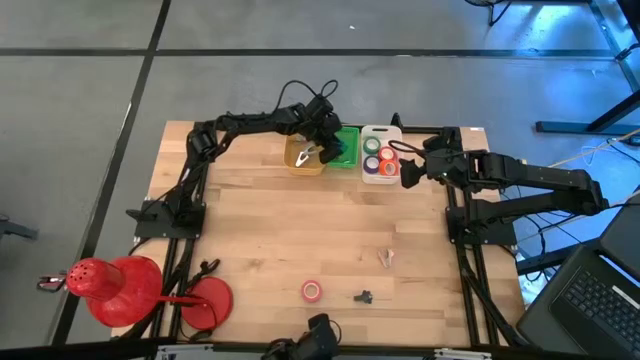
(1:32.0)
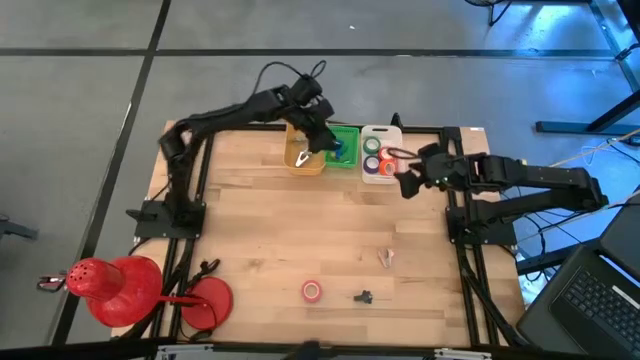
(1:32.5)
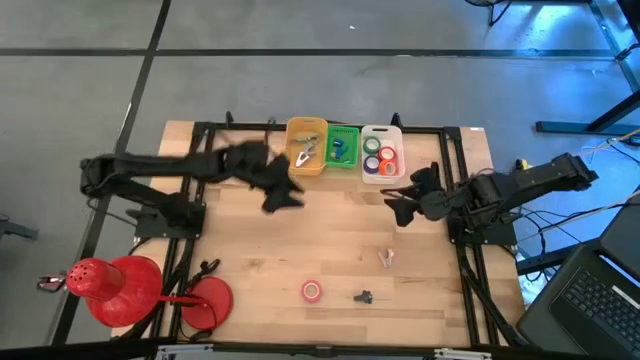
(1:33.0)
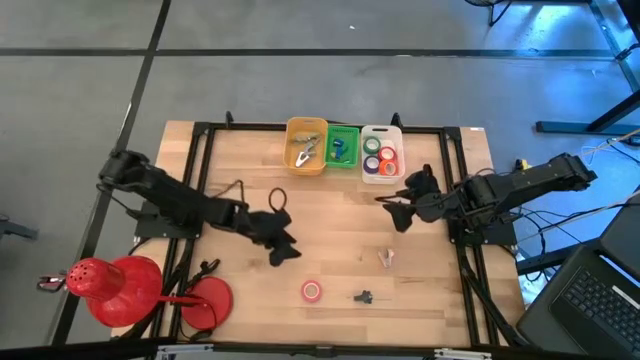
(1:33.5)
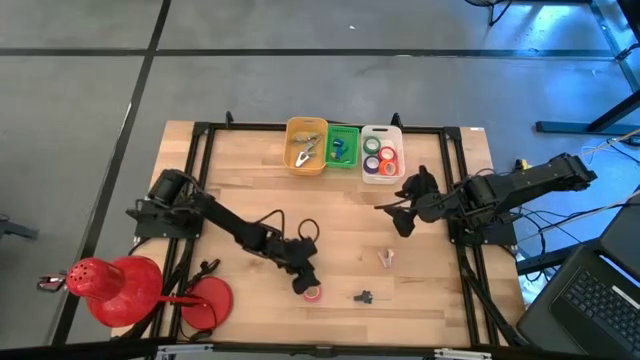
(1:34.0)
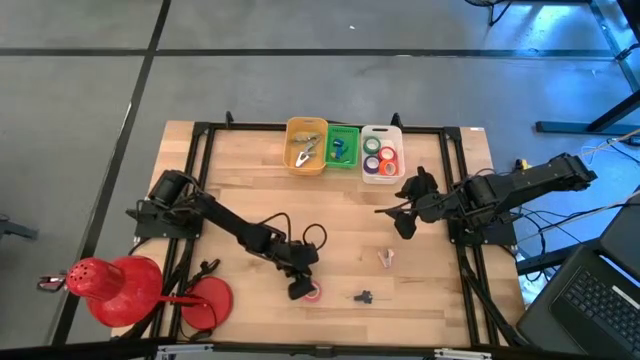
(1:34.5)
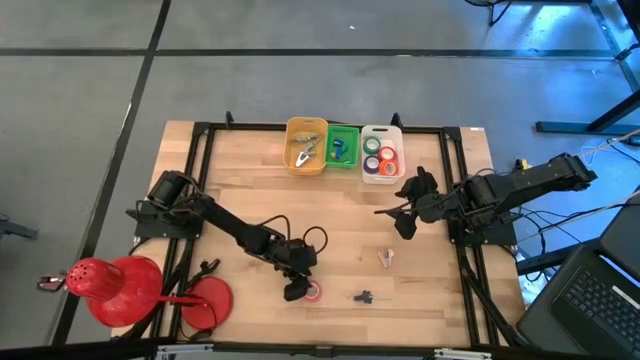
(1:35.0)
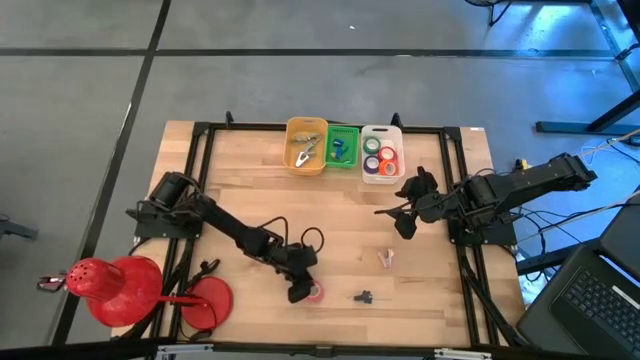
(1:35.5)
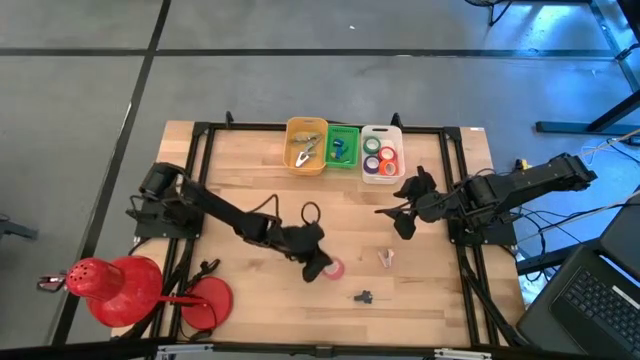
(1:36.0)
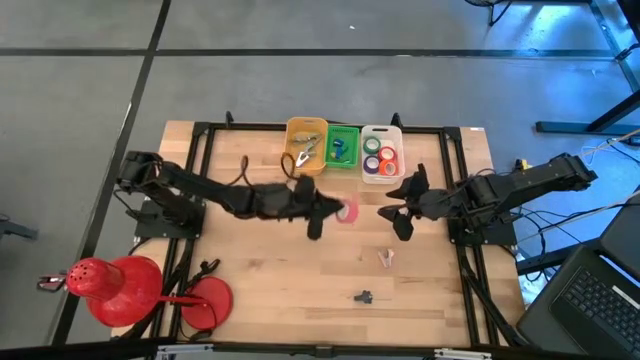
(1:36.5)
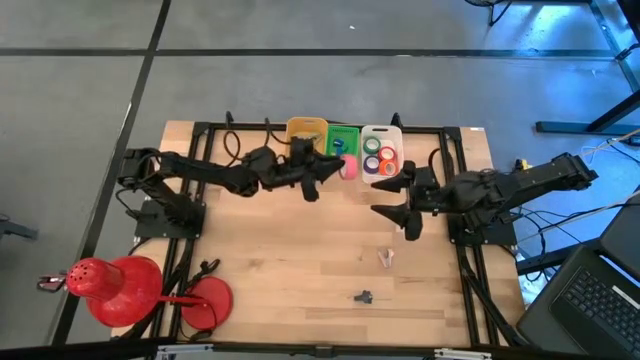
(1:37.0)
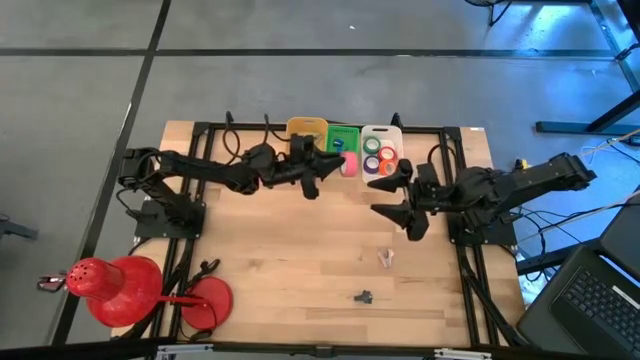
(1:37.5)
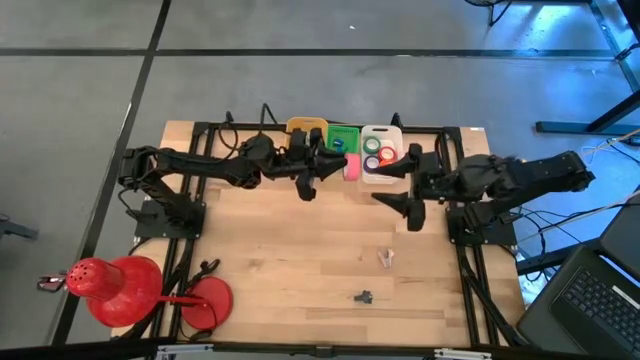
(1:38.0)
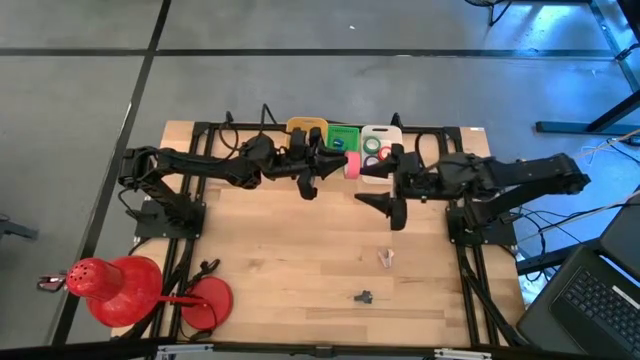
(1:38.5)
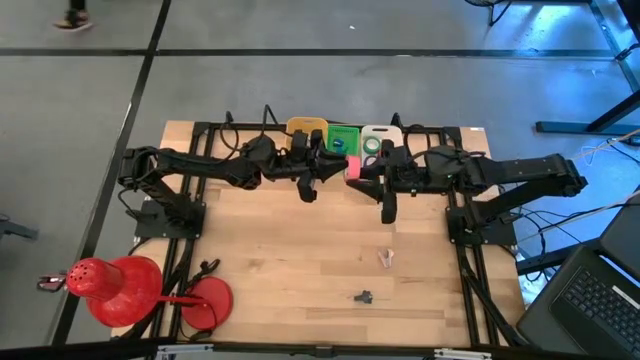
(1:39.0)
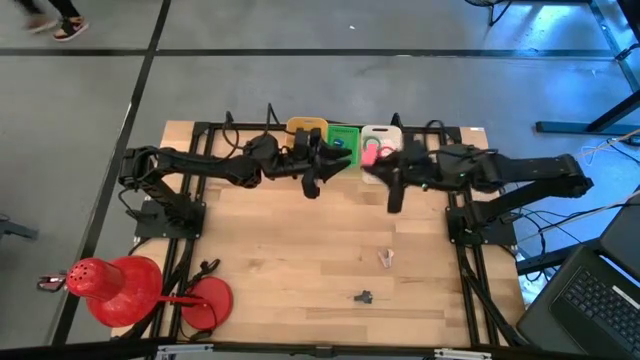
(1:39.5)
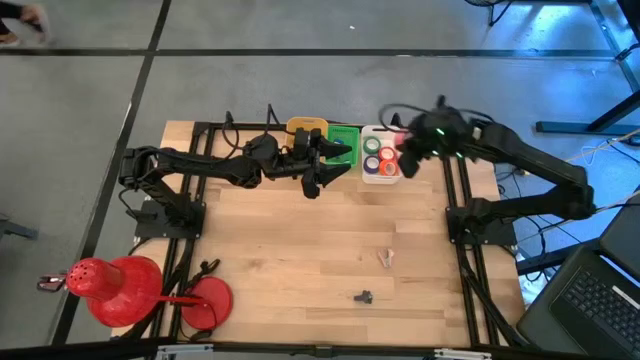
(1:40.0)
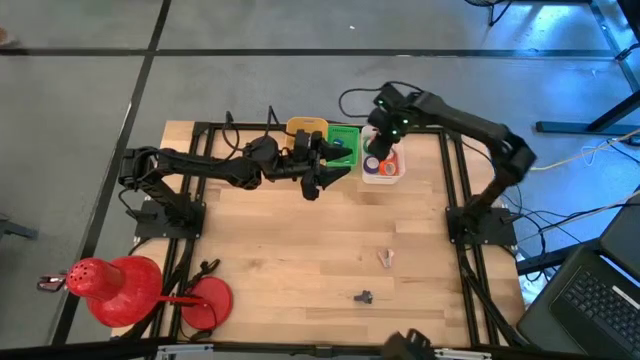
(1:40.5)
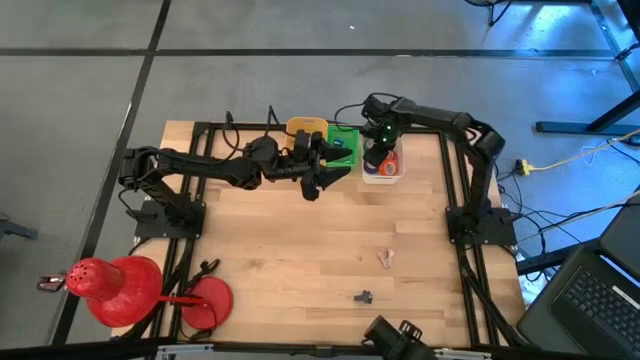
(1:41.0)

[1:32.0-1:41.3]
Task: Pick and place Stapler, Stapler remover, tape
Put the pink tape into the white bin

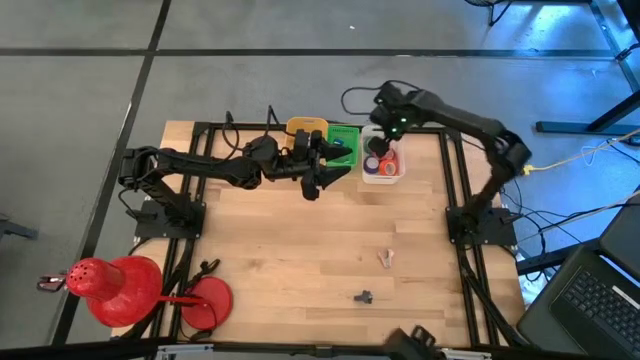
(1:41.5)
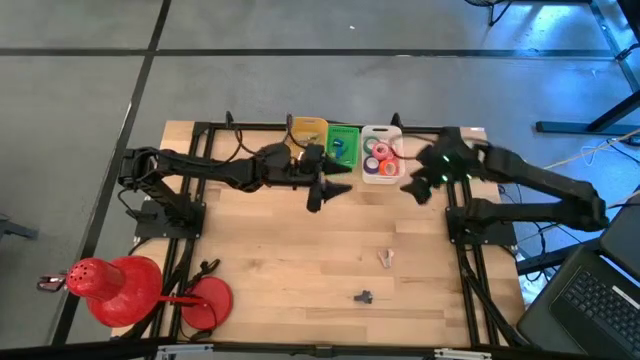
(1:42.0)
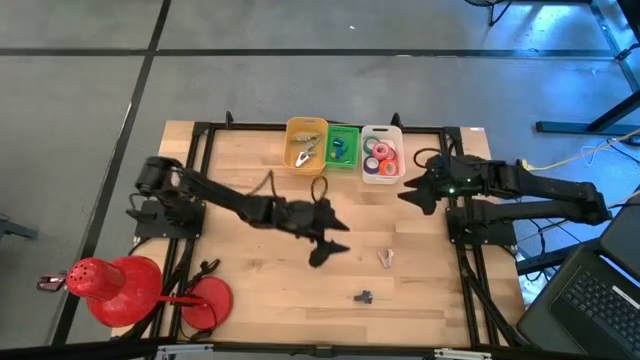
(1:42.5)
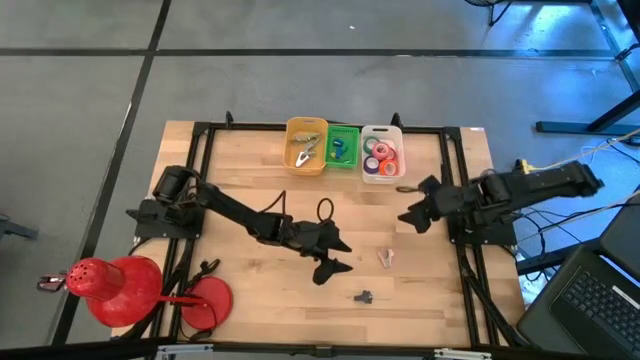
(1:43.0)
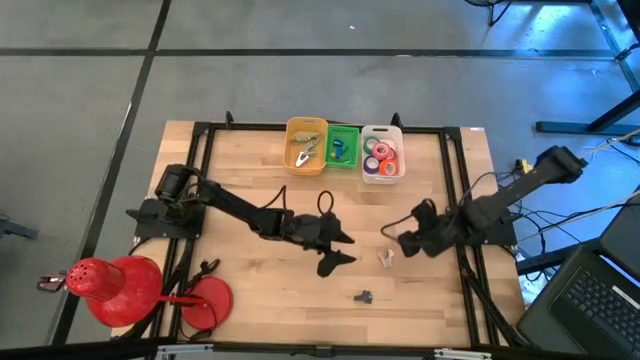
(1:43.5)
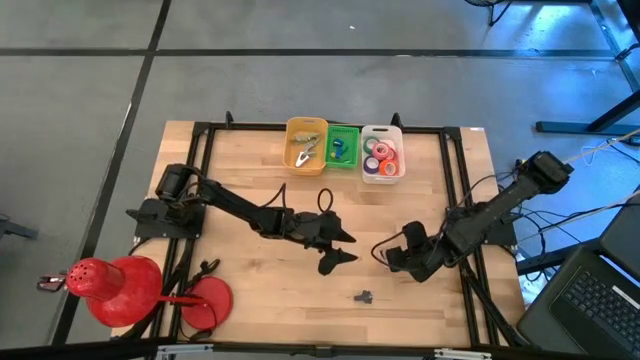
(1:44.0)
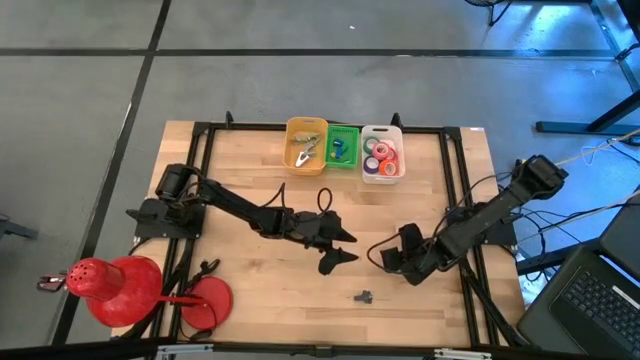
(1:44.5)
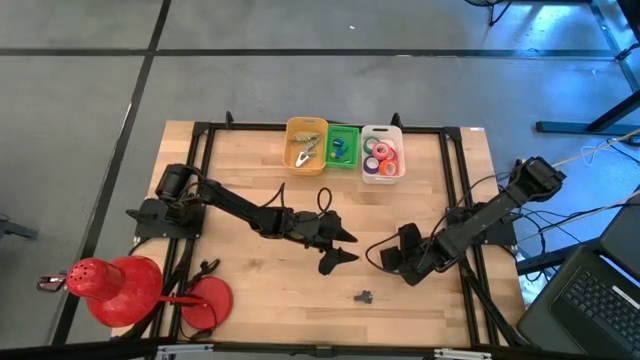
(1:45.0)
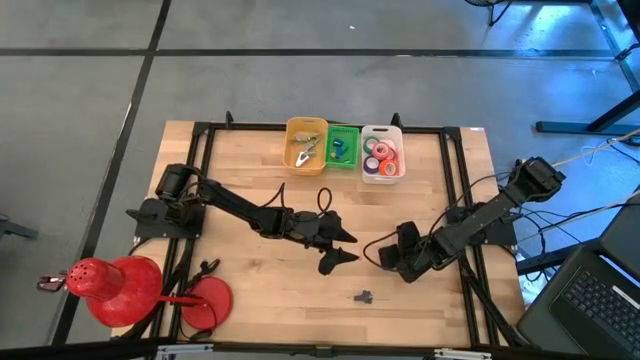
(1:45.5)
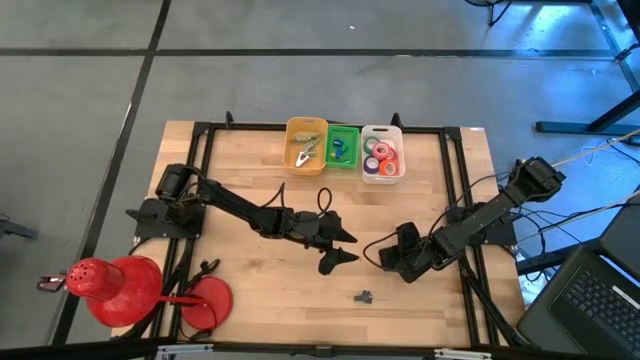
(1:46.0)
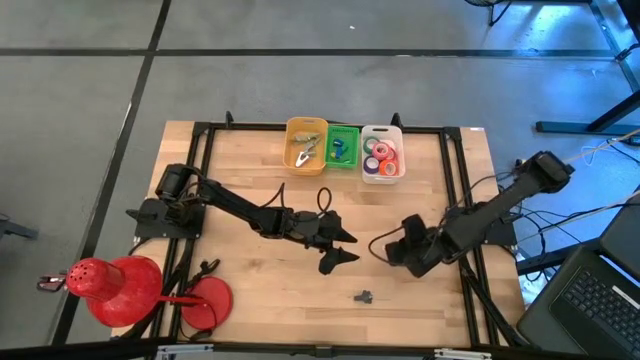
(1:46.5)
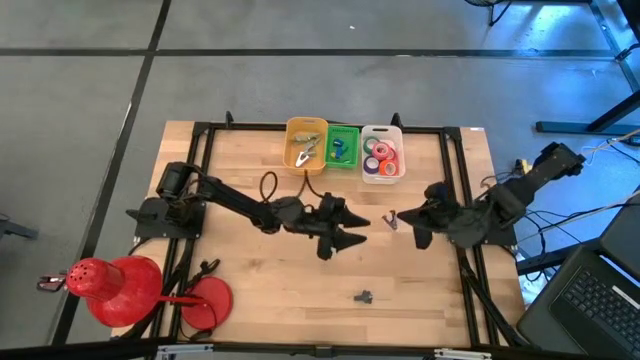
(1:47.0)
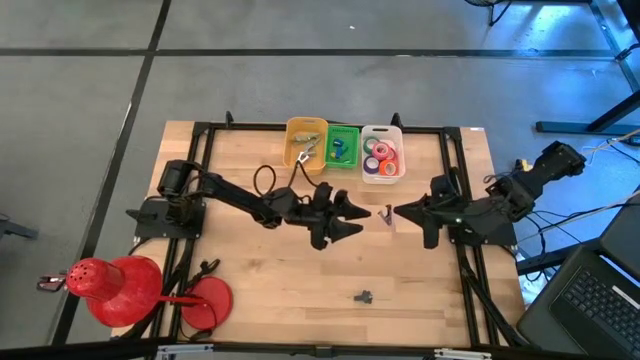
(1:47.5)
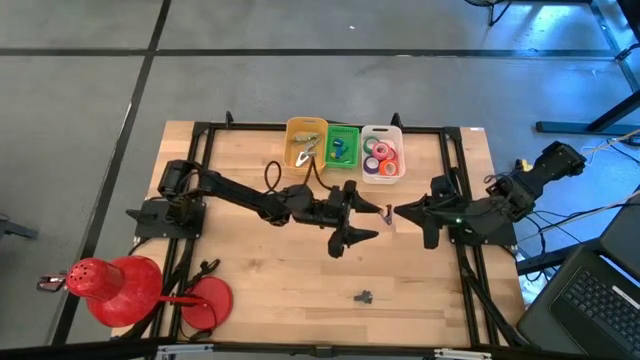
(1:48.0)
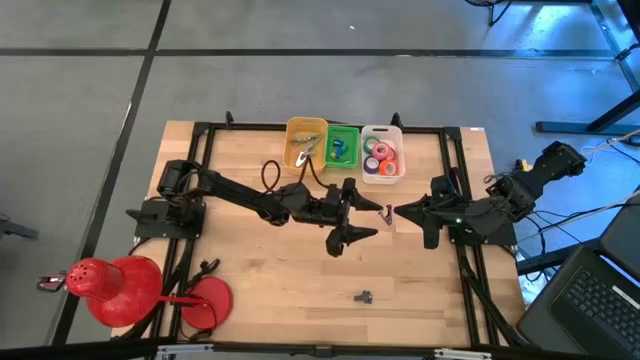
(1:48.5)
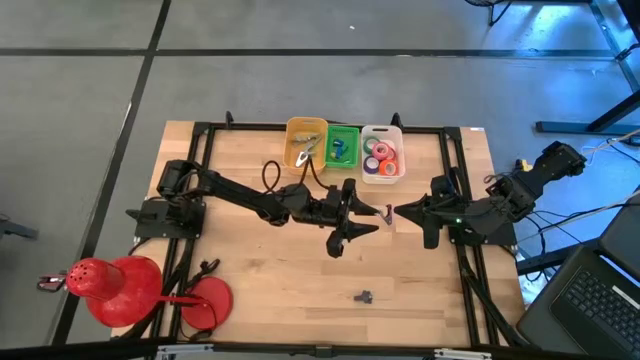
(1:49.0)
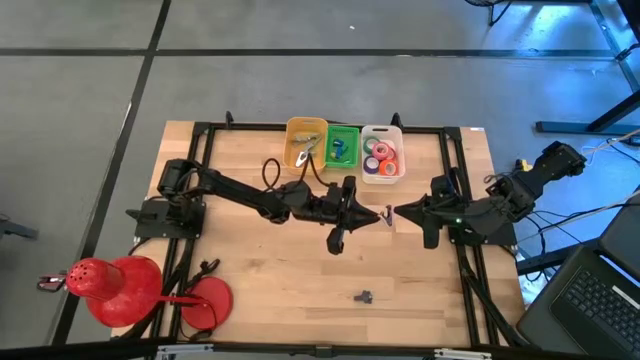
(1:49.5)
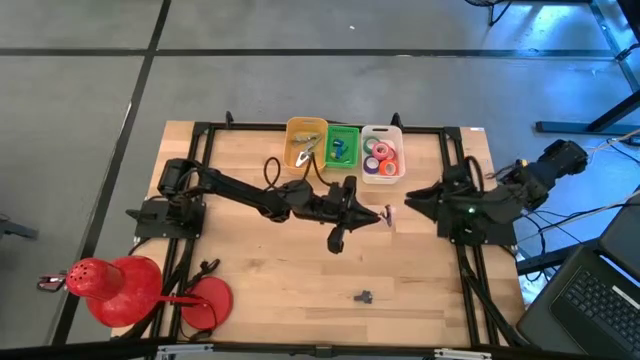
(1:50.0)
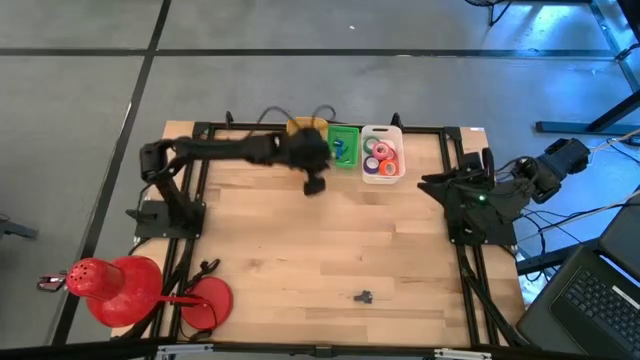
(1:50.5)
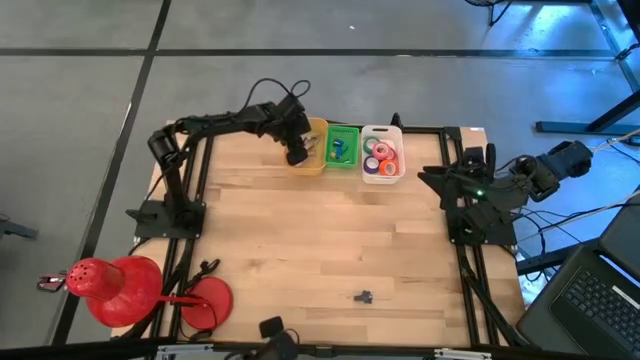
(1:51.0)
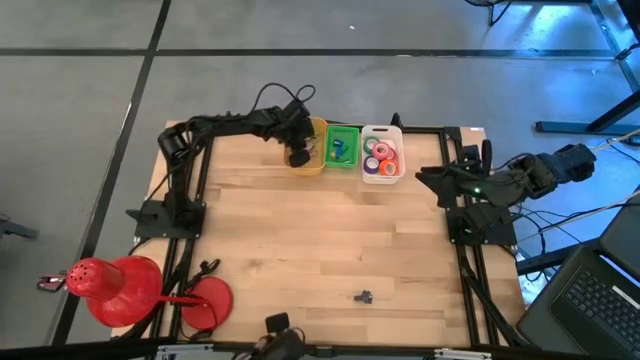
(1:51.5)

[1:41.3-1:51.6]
Put the pink staple remover into the yellow bin

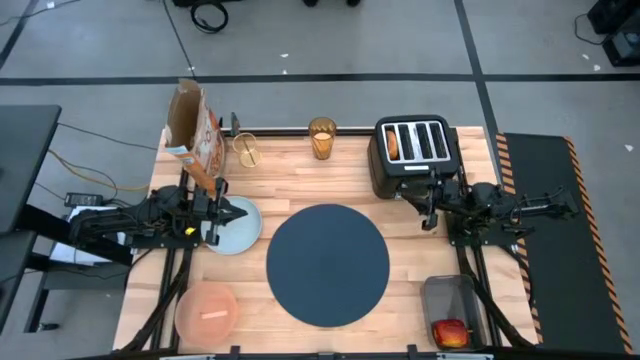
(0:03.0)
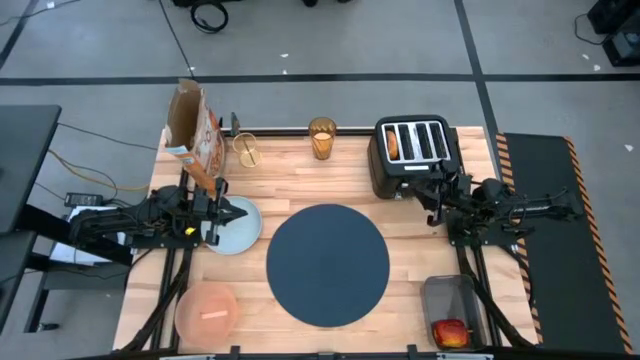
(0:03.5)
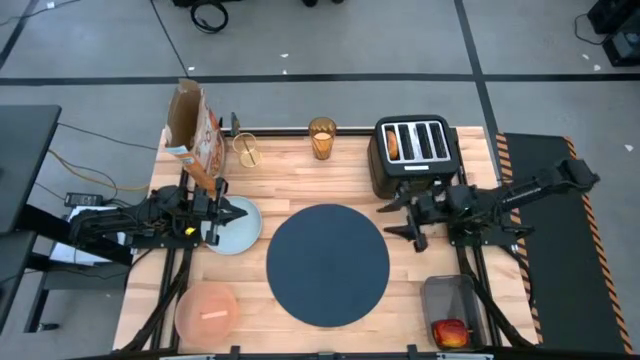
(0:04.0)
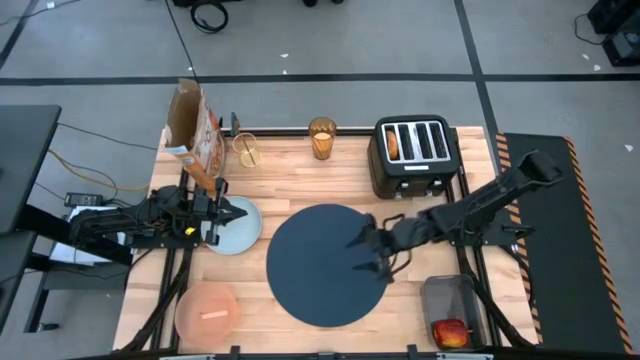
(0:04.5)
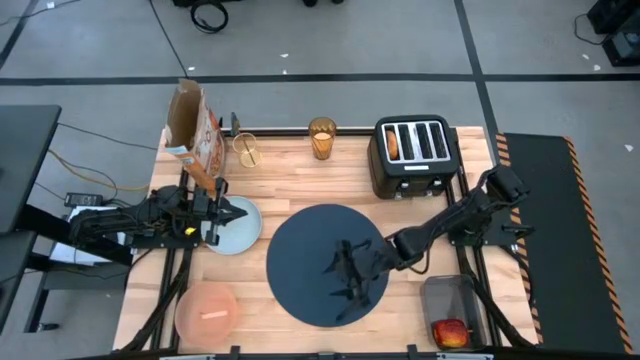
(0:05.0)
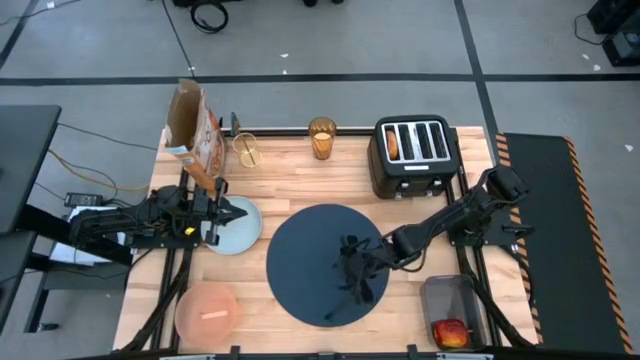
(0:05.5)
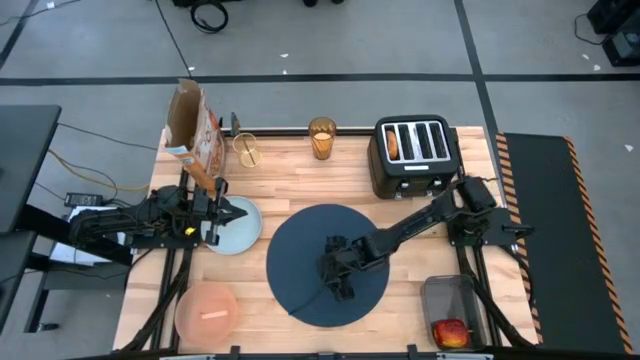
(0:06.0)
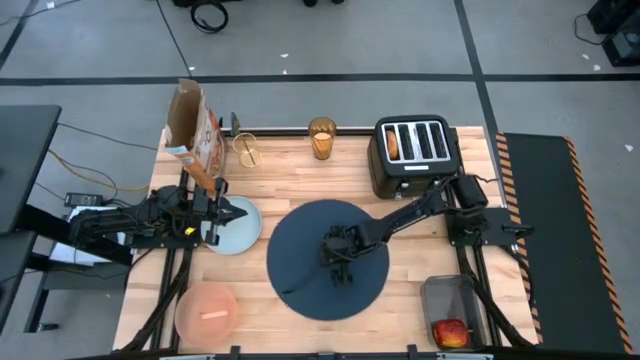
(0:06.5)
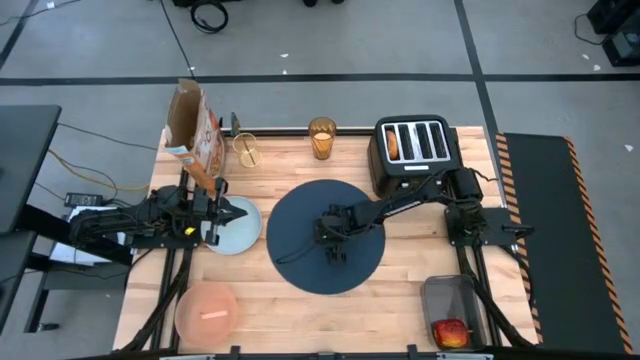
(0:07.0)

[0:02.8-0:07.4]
Task: Arrange a breakfast setting
Adjust the blue tablemat
